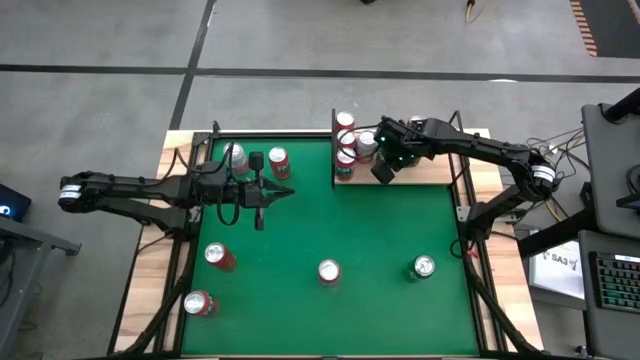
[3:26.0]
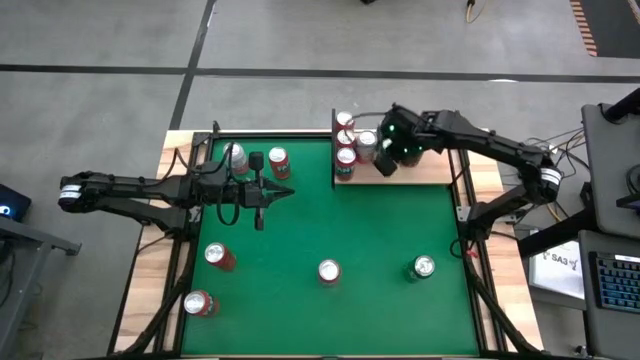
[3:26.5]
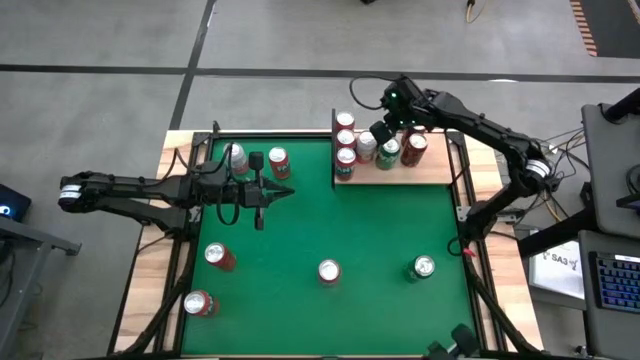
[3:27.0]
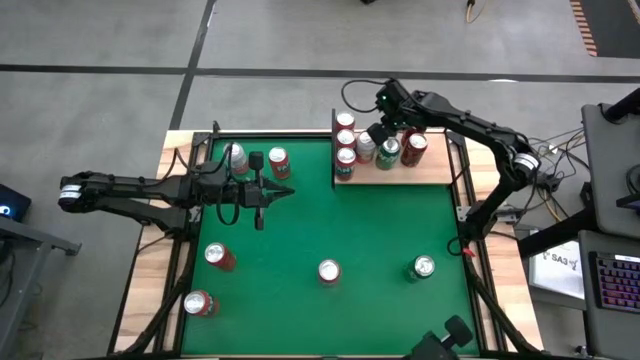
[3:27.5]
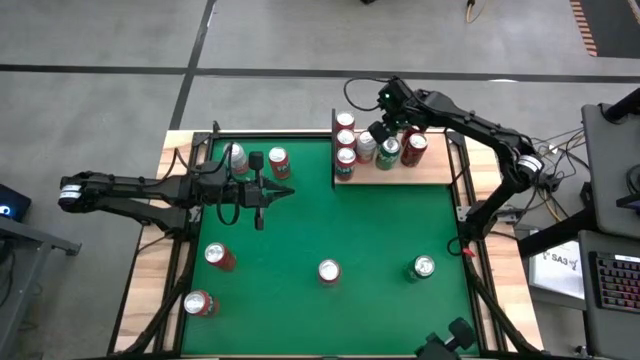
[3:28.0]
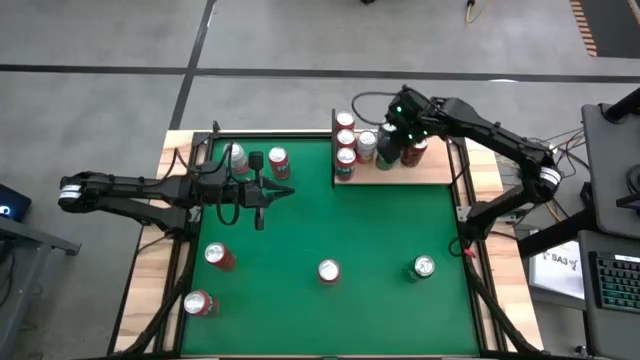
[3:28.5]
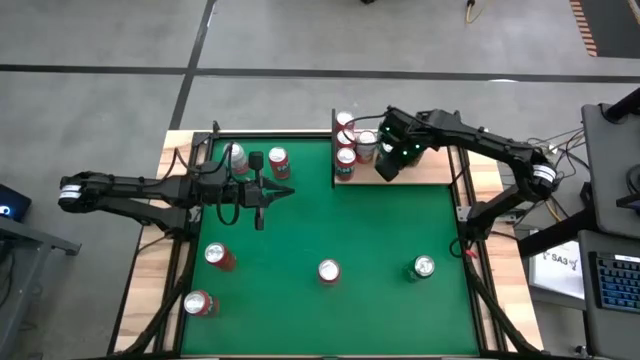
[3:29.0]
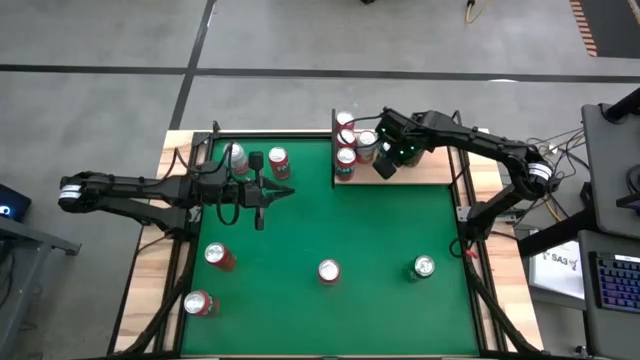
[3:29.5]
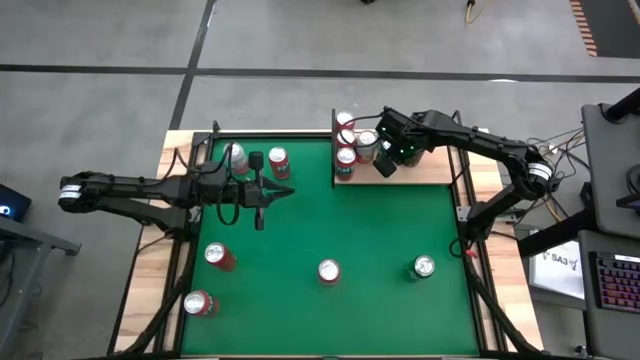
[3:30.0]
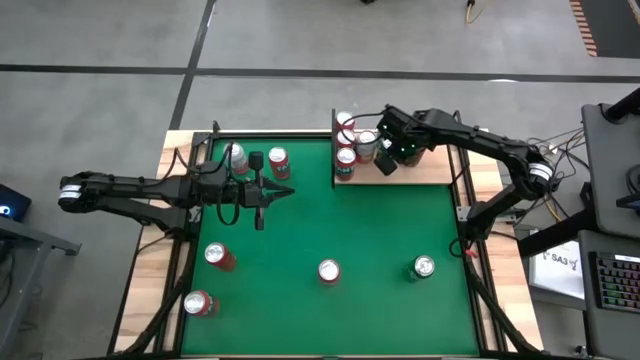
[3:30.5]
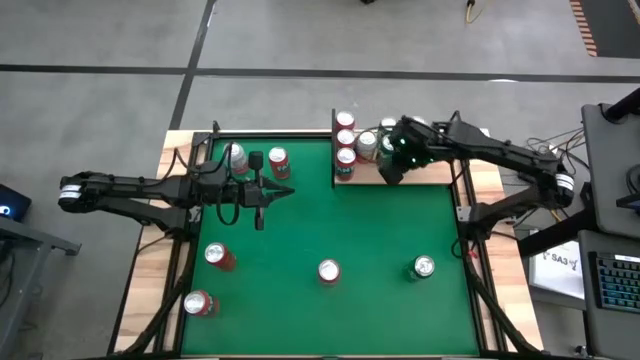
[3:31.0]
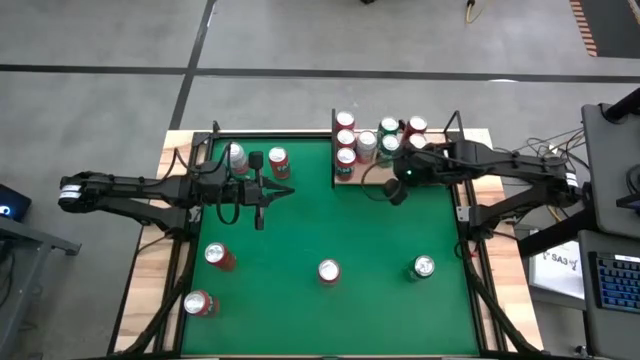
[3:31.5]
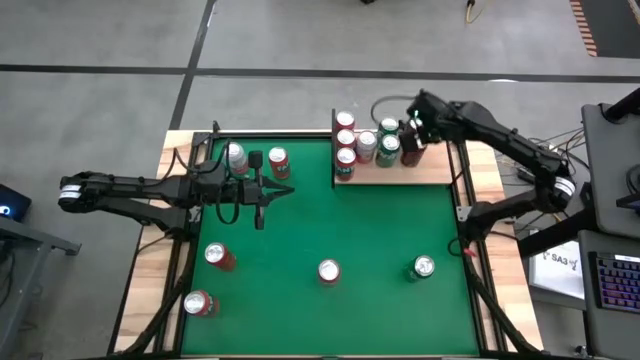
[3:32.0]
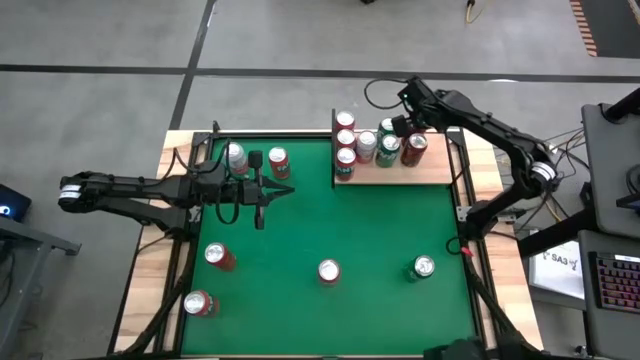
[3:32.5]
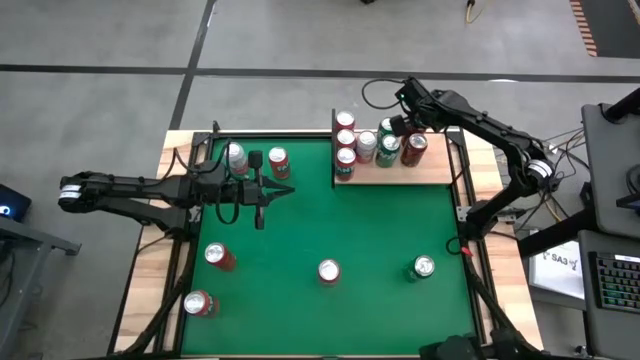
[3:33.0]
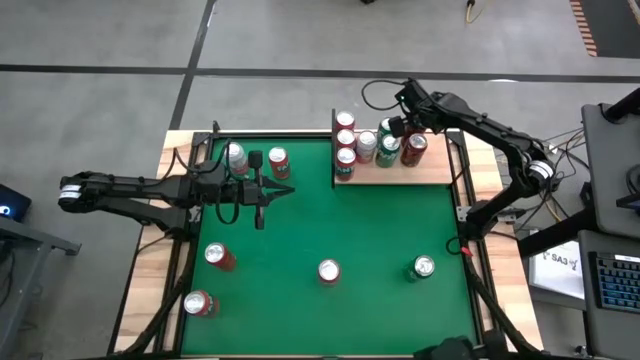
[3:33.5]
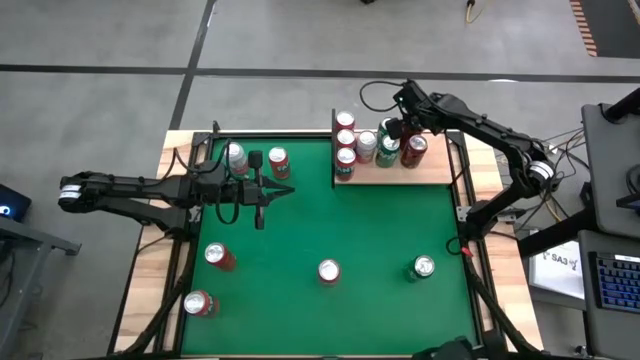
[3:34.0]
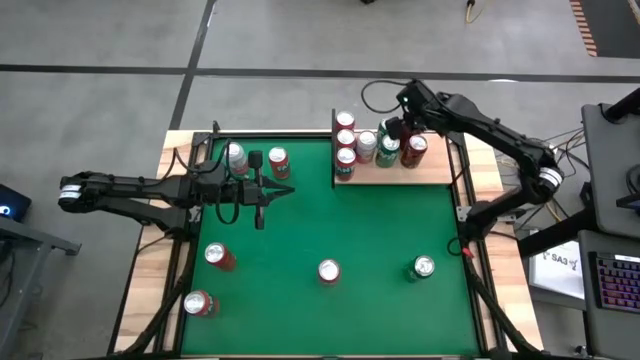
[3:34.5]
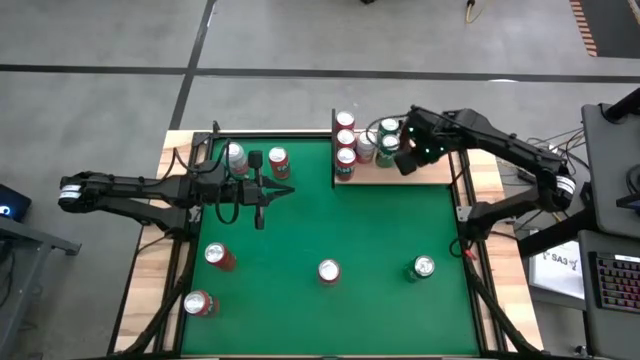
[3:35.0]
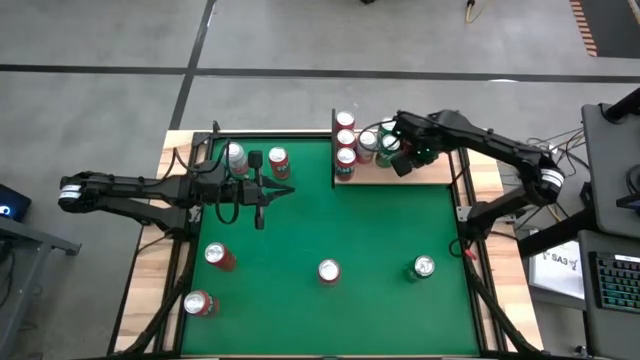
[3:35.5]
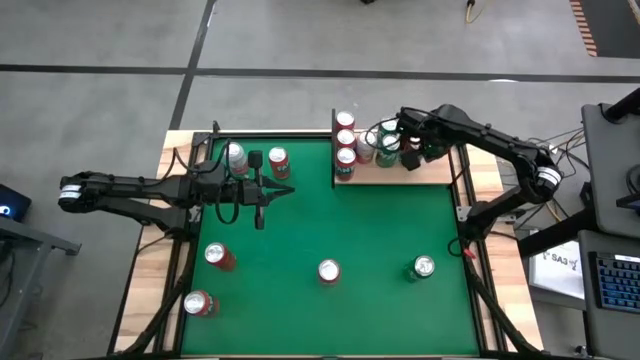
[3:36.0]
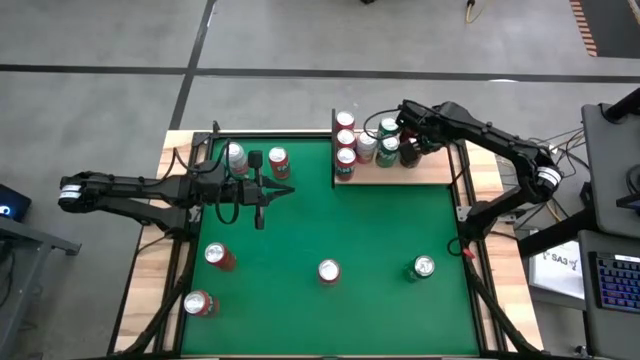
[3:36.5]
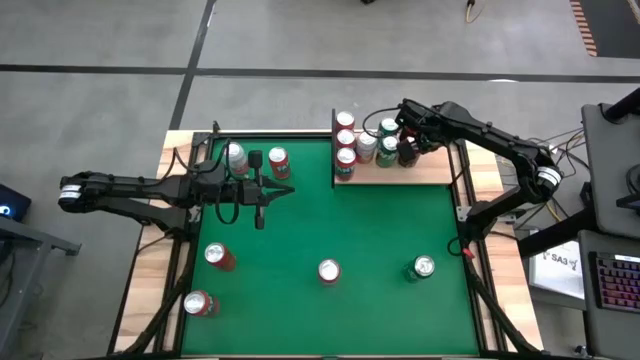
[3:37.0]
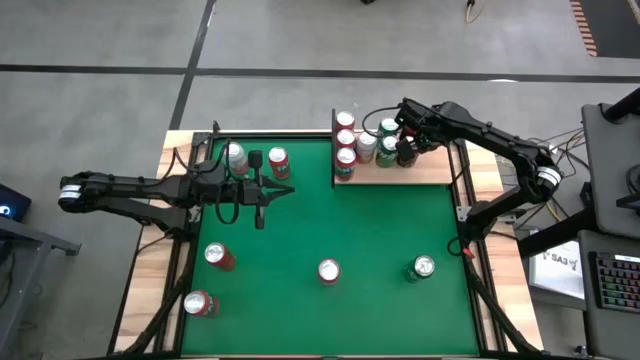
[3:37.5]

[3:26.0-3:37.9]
Task: Place canned beverage on shelf
Adjust the soda cans on the shelf

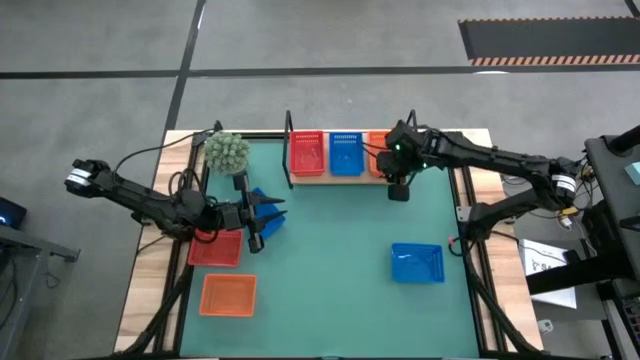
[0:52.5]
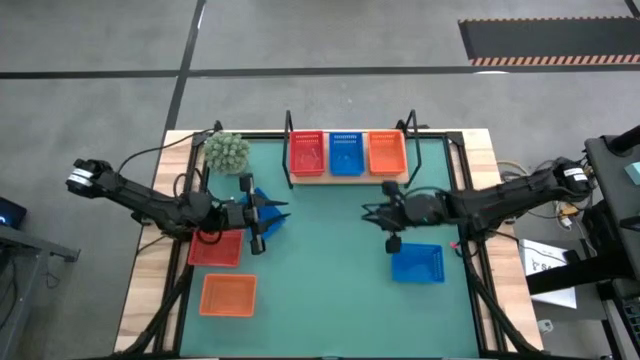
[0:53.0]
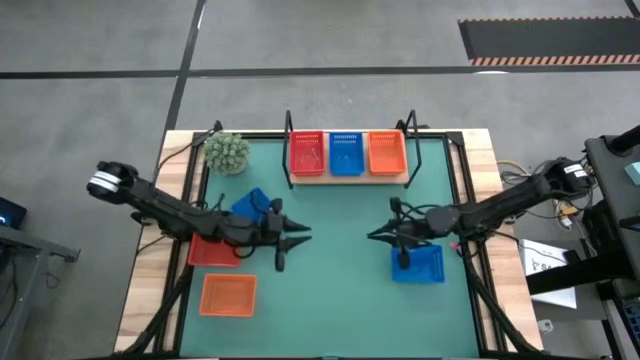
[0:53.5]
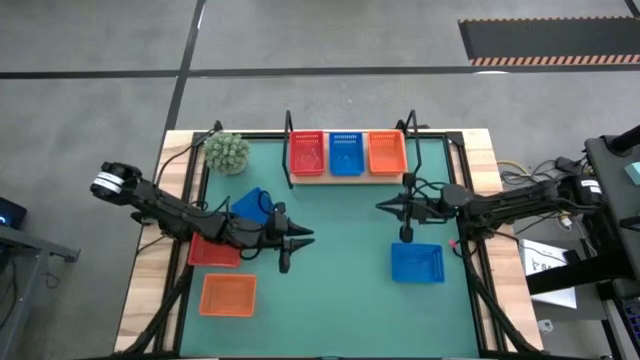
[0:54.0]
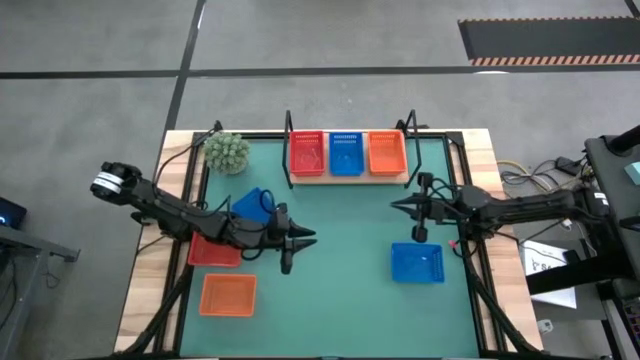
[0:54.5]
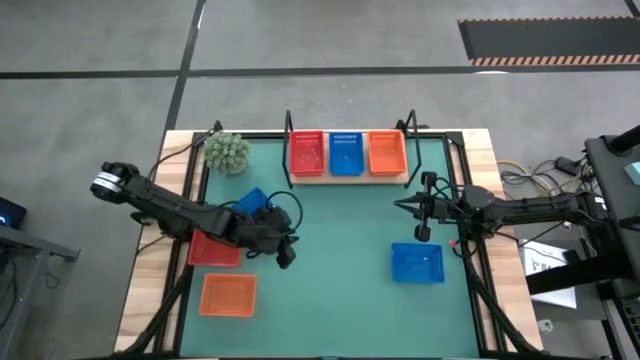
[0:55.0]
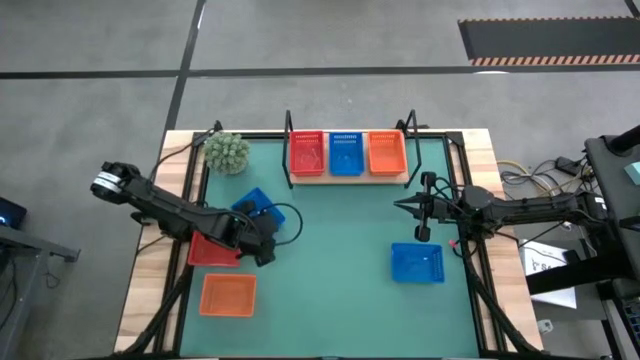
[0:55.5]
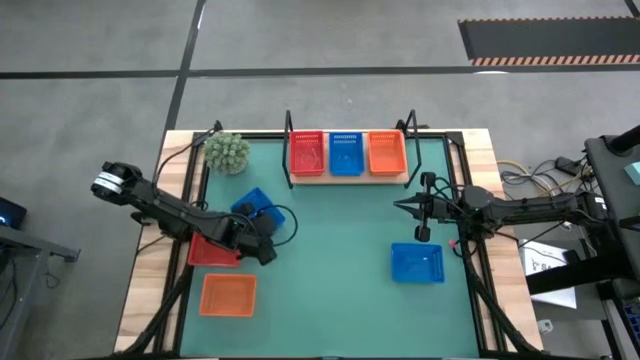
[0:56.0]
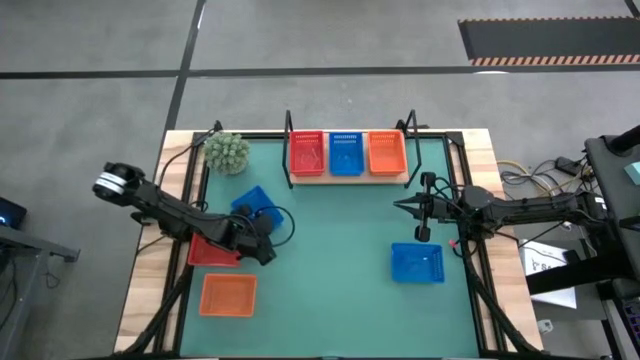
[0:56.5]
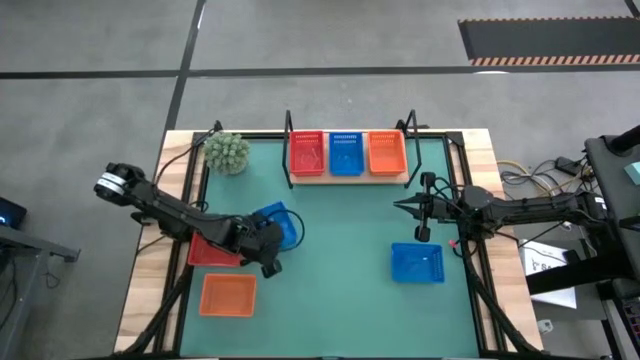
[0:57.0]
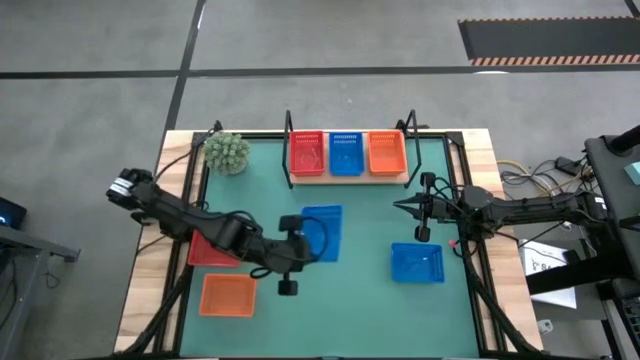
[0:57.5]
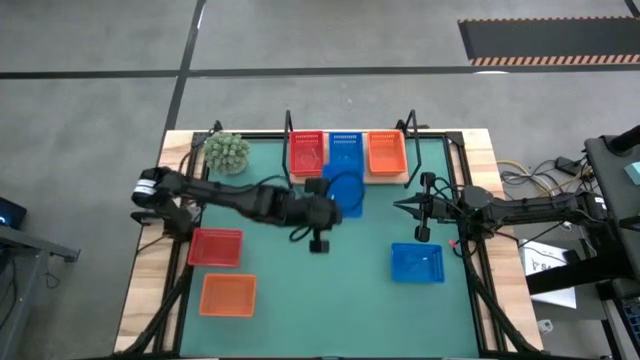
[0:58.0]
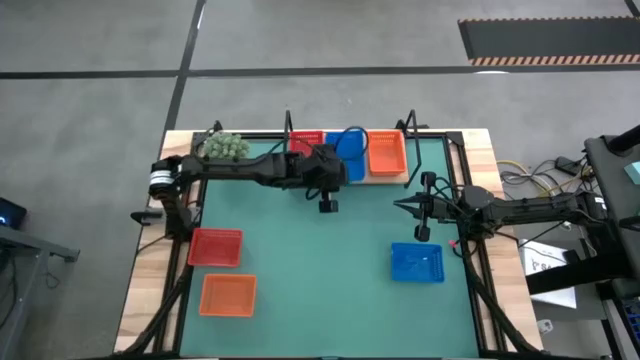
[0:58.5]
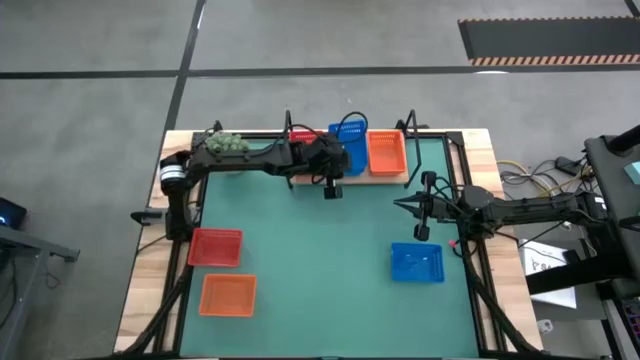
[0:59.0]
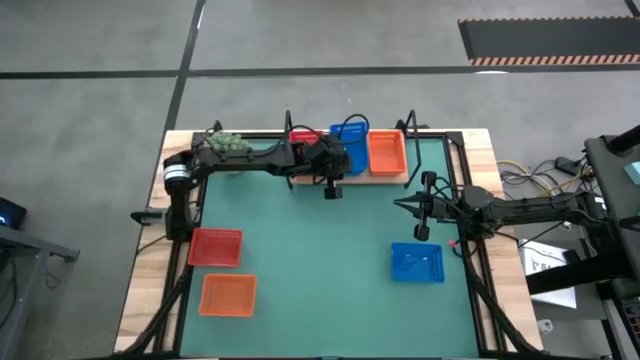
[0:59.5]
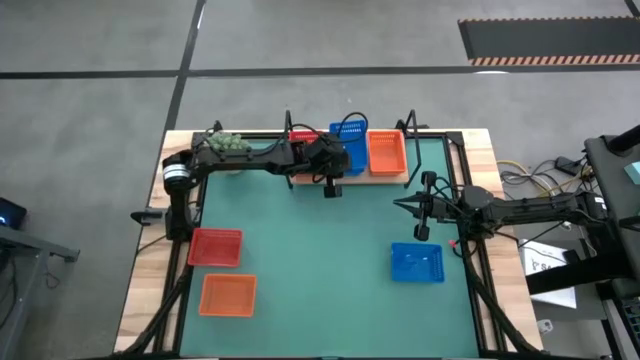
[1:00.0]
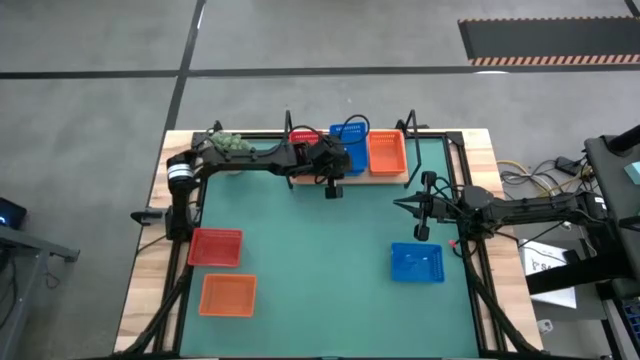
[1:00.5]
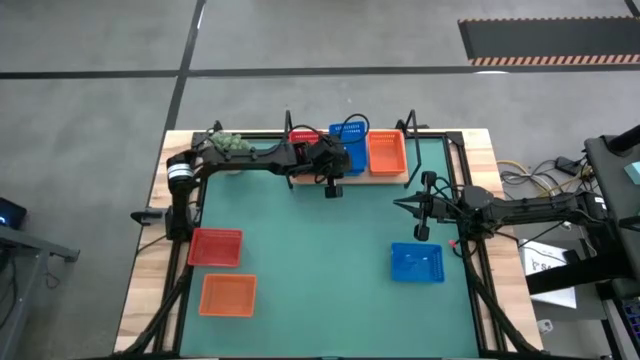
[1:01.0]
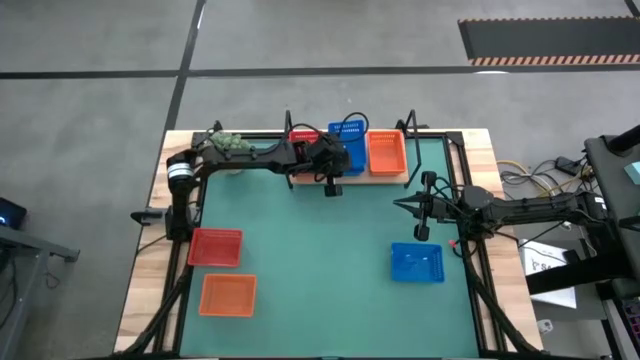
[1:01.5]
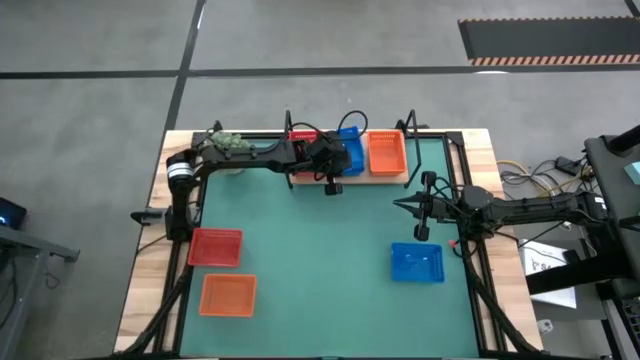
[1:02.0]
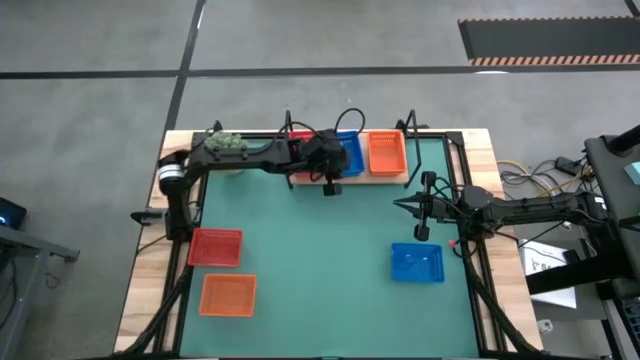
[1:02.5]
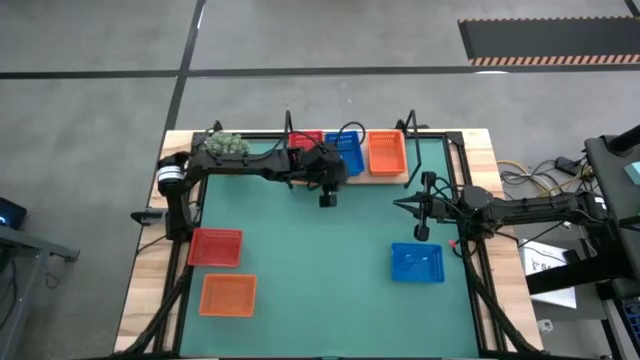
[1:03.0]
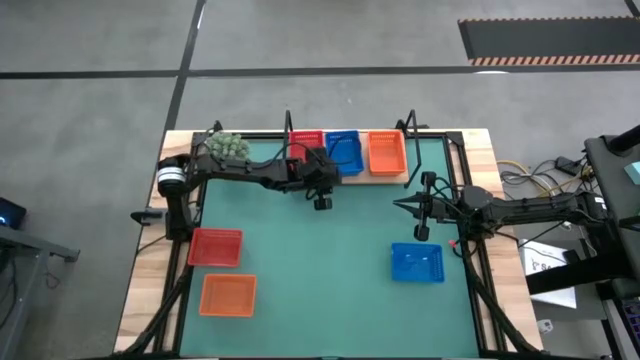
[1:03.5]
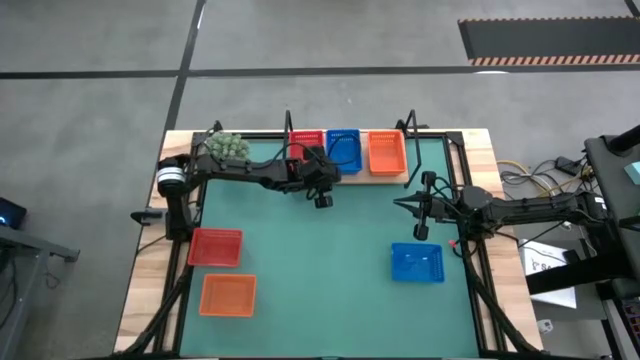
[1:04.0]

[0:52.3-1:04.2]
Task: Stack baskets on shelf by color
Stack the left blue bin on top of the blue bin on the shelf
